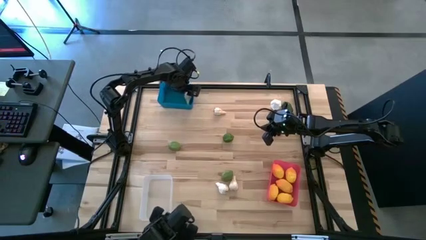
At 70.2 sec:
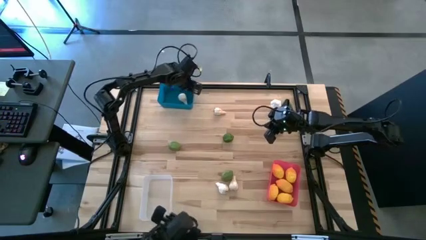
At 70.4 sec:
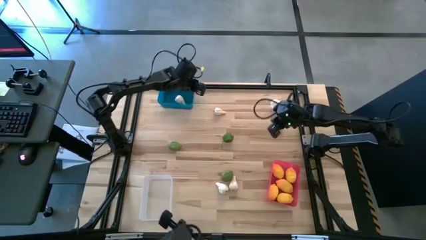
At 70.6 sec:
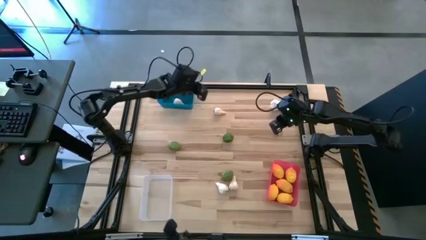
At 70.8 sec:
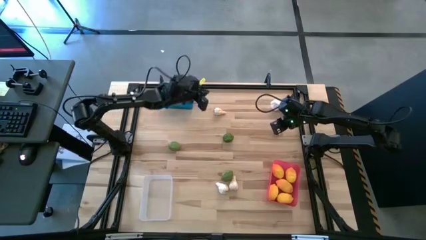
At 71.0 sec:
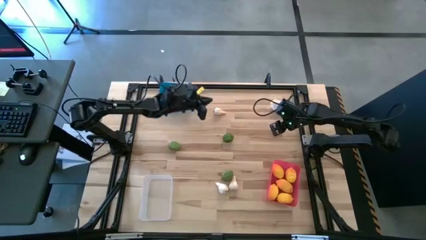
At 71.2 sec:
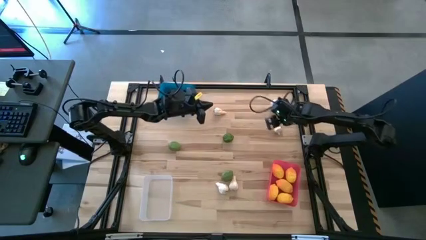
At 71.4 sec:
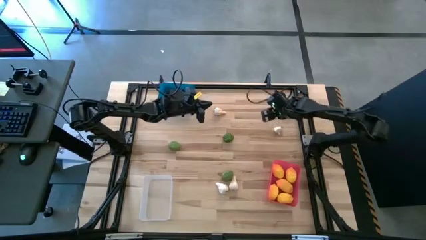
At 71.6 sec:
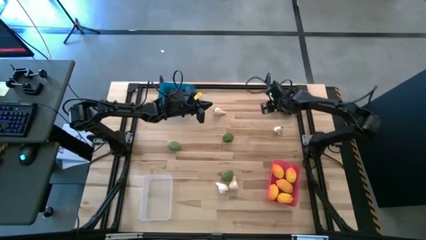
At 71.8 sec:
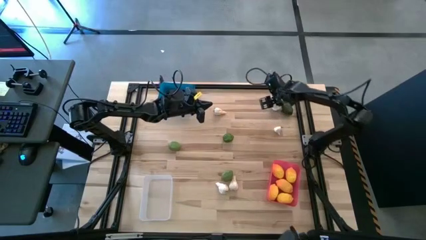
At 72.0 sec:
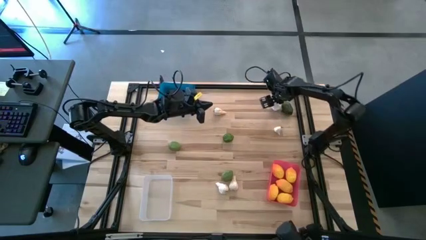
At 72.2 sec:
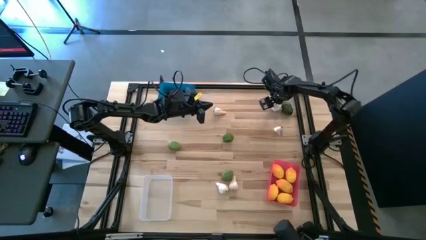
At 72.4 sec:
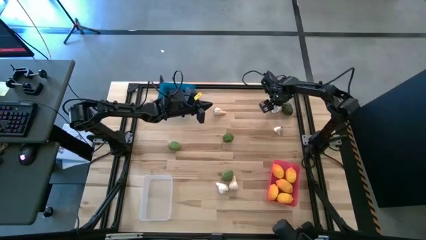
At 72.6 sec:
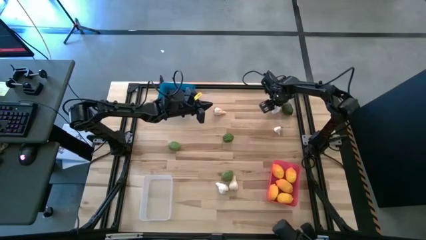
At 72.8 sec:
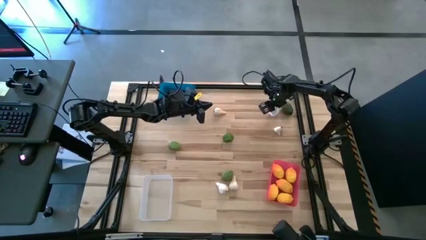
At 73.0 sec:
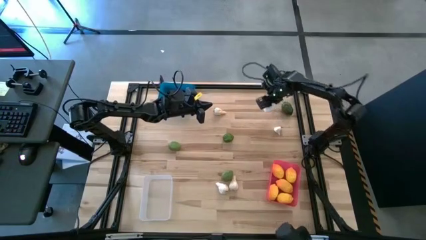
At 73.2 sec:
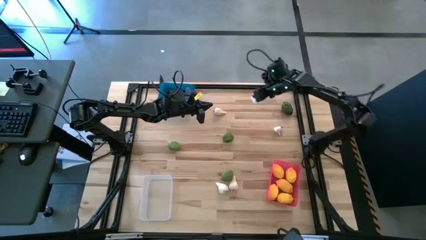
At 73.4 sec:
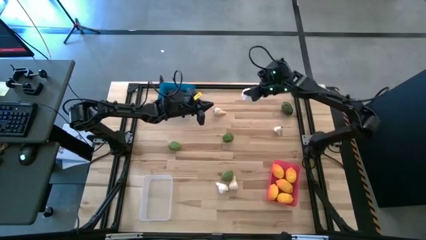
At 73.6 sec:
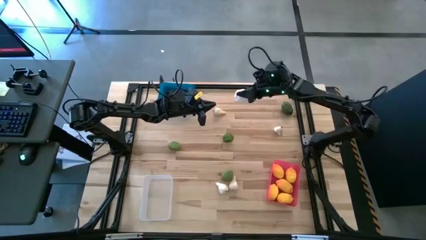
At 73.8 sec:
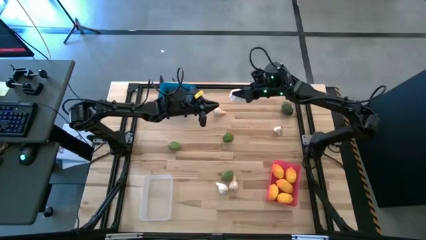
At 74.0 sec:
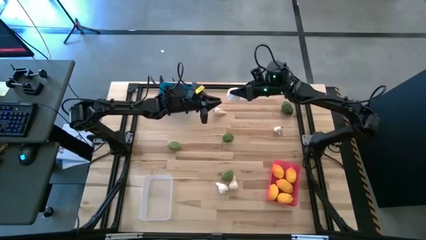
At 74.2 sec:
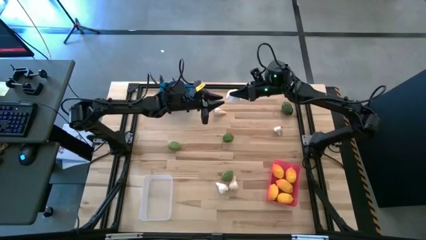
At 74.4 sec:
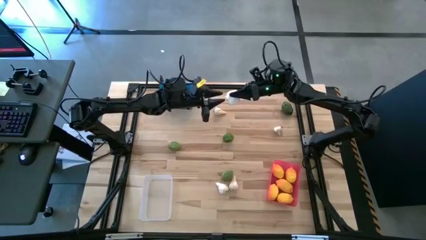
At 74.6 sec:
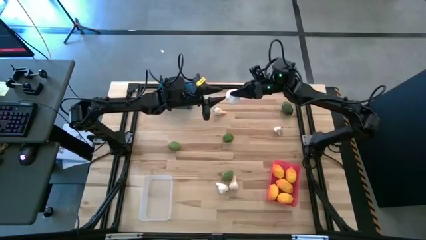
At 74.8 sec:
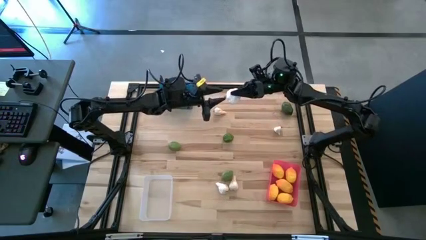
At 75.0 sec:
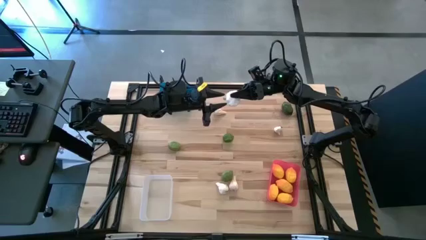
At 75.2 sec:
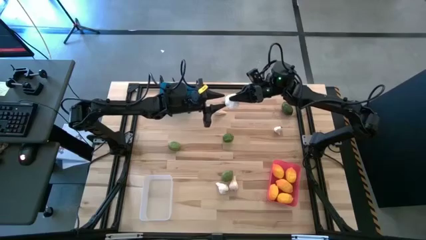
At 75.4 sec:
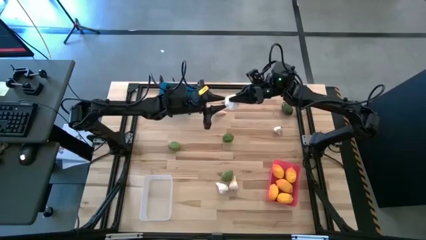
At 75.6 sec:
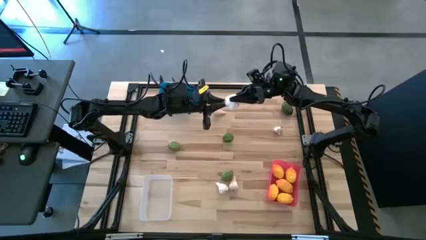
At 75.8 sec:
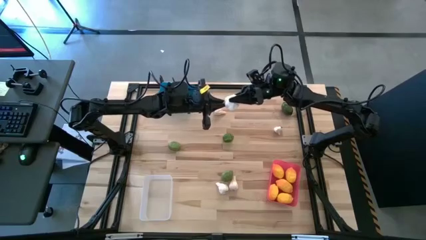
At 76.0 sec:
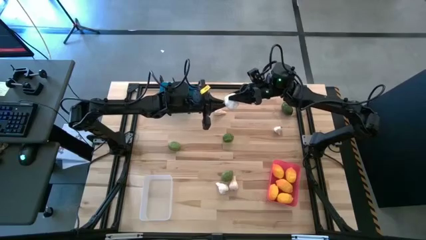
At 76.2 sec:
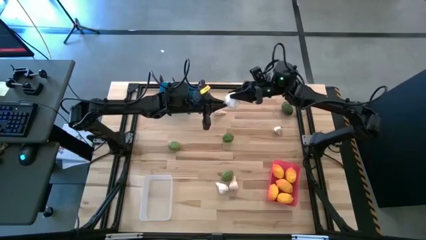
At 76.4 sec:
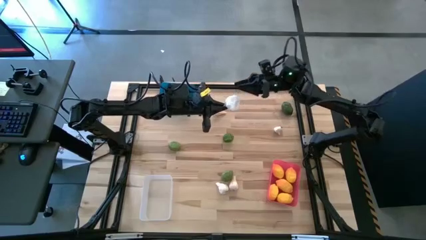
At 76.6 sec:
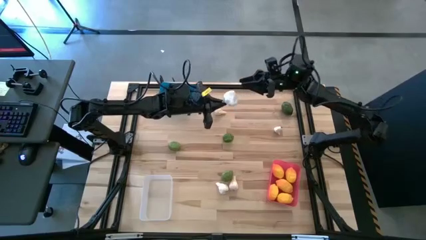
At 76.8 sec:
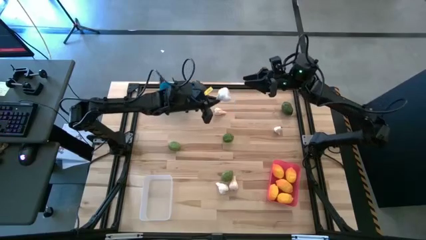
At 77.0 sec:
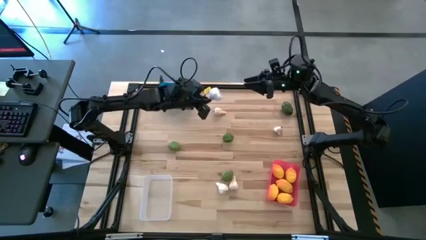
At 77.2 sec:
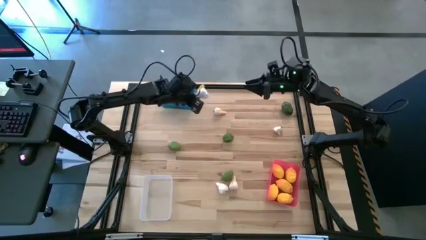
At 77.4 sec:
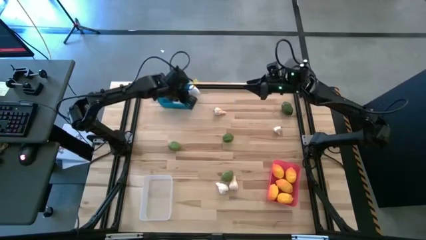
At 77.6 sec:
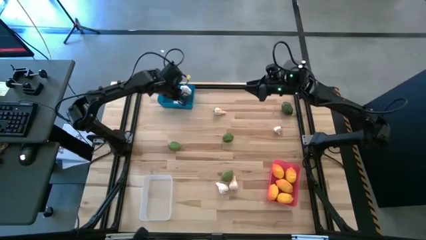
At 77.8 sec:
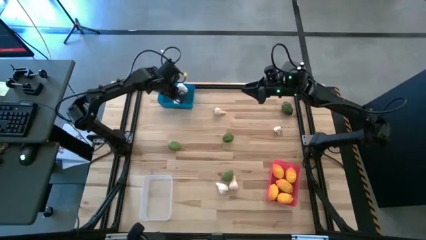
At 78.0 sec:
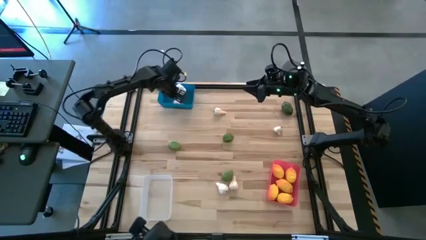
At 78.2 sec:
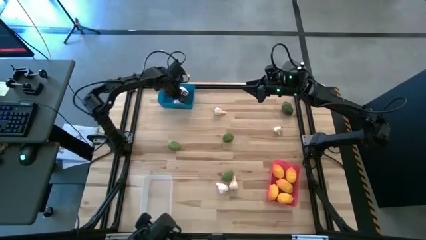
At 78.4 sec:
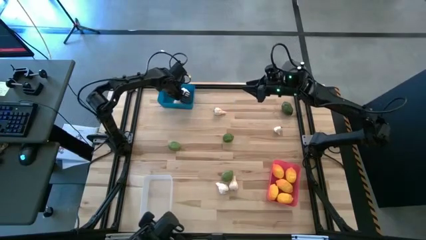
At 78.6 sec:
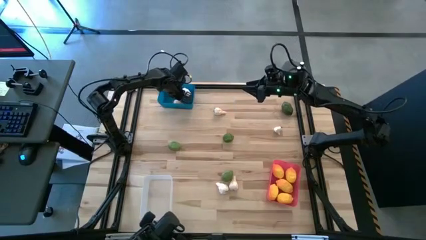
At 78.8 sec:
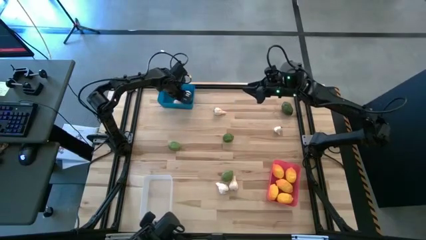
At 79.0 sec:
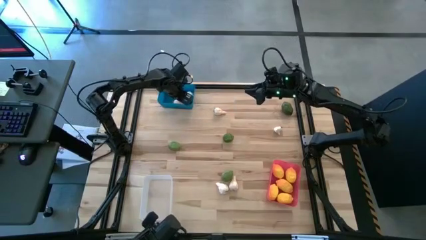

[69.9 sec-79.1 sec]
Task: Sort produce into baskets
Put the garlic into the blue bin

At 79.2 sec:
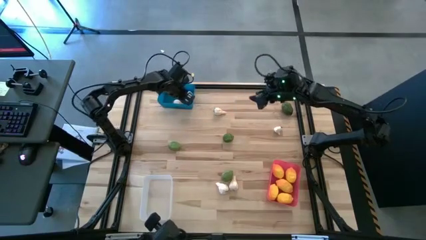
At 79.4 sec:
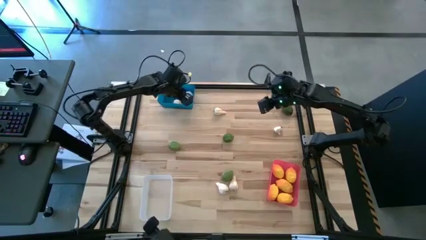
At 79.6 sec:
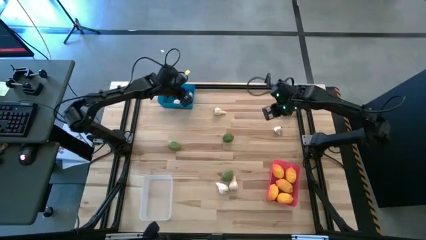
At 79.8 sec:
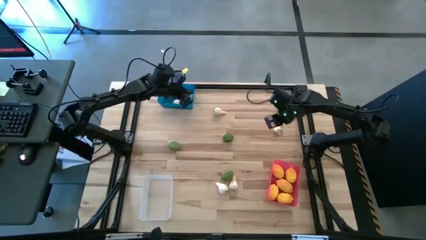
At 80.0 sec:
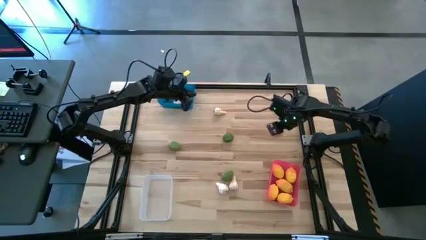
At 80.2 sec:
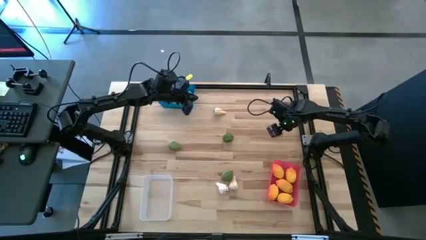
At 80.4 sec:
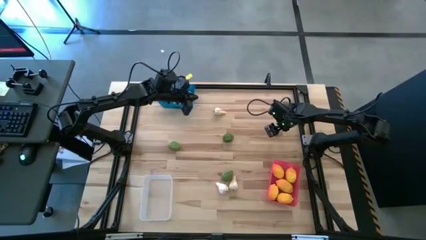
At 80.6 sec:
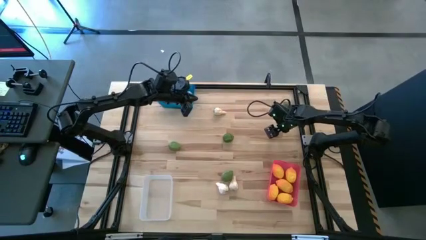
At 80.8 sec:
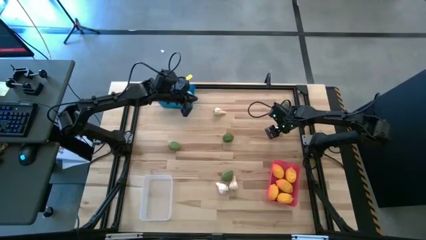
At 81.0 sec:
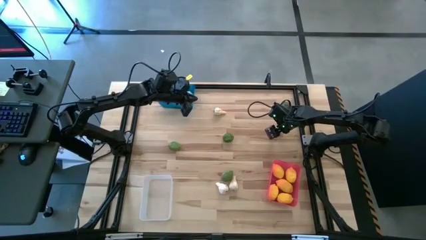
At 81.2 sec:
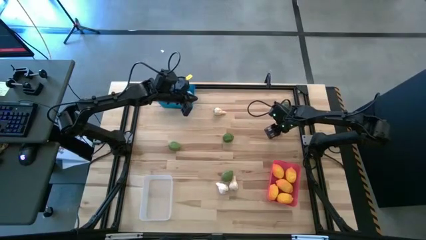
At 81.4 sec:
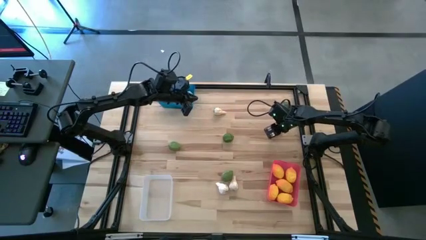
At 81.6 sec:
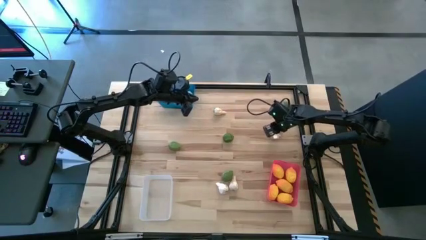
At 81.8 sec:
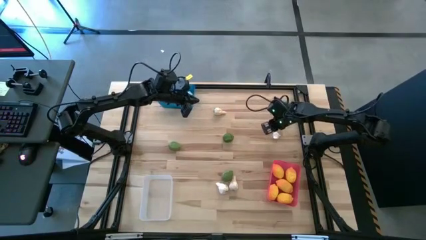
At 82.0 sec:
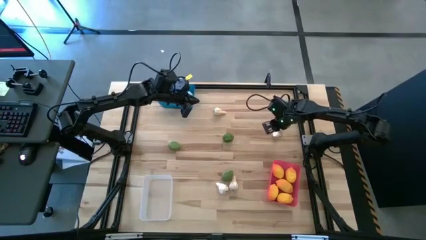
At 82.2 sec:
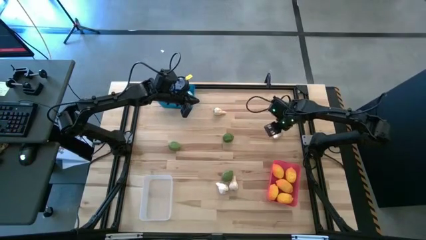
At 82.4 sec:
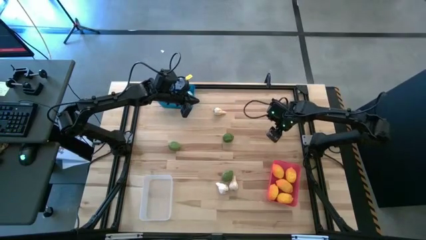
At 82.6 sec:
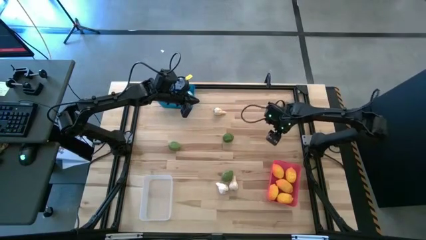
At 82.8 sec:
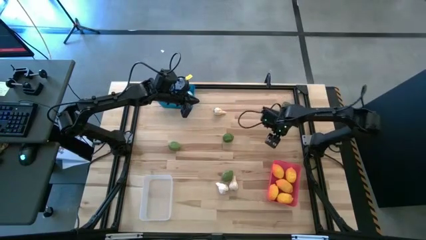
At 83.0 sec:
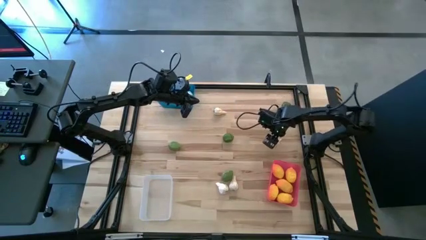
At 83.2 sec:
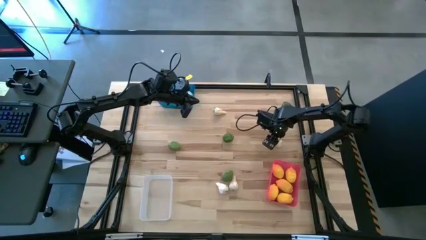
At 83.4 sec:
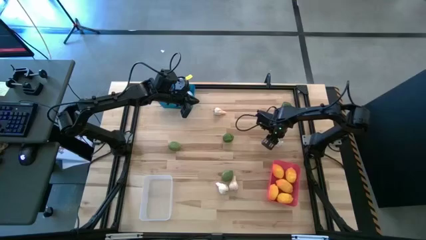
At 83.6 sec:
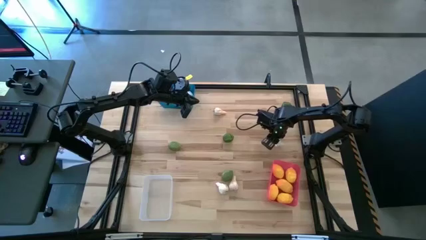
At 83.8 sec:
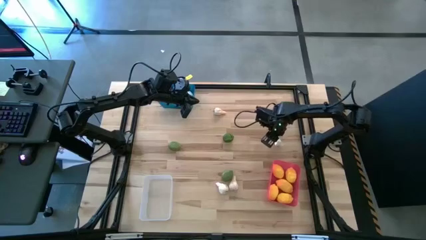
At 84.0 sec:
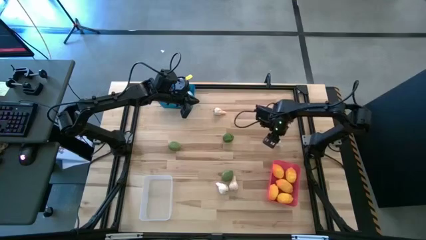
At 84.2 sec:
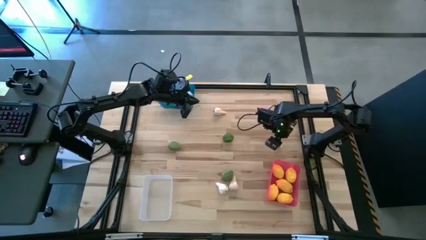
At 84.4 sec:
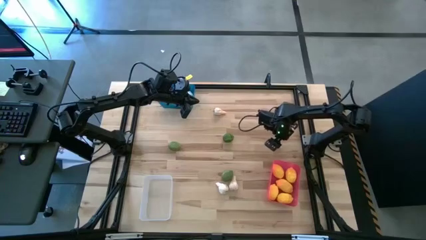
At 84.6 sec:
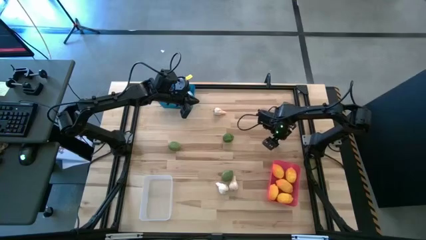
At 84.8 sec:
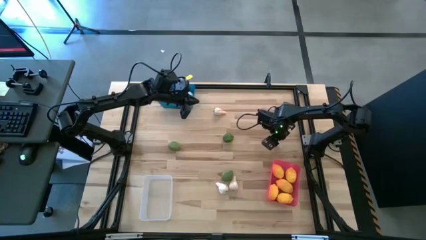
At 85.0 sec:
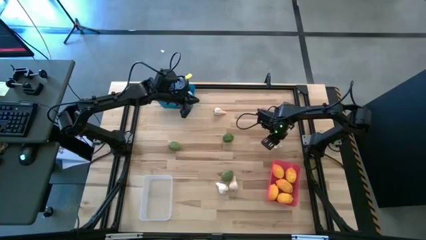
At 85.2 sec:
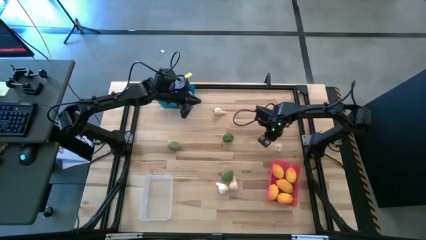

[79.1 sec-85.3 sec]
Put the garlic into the blue bin

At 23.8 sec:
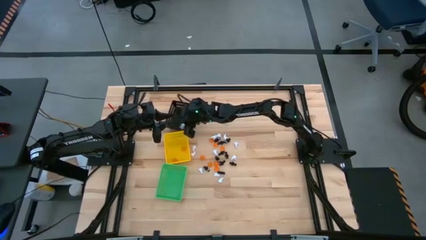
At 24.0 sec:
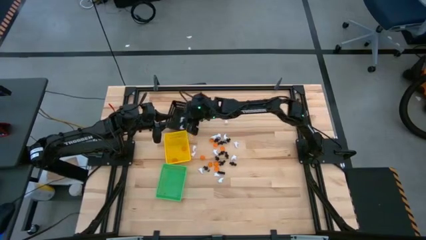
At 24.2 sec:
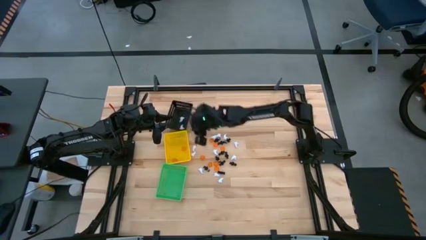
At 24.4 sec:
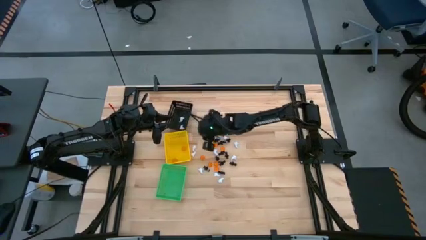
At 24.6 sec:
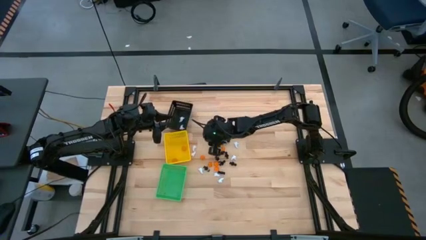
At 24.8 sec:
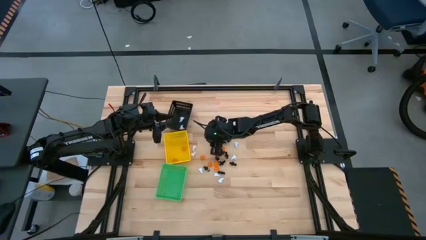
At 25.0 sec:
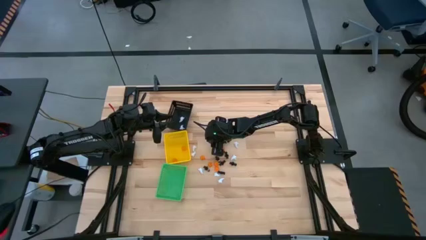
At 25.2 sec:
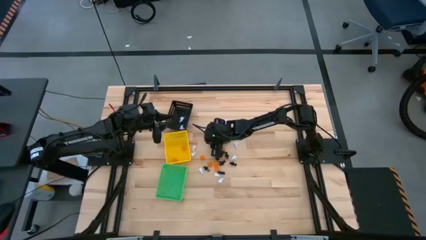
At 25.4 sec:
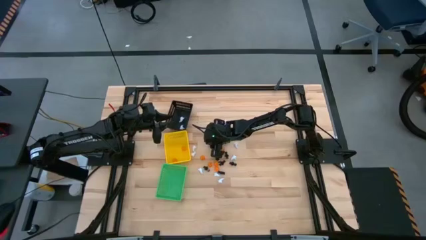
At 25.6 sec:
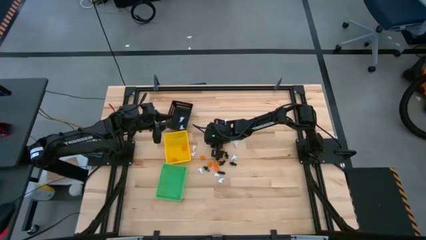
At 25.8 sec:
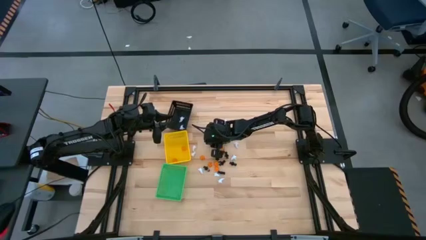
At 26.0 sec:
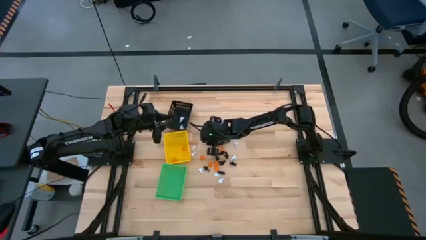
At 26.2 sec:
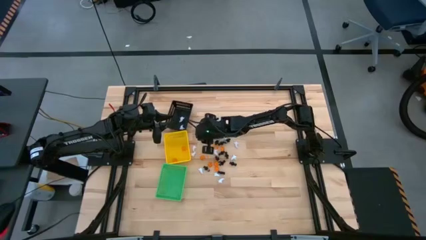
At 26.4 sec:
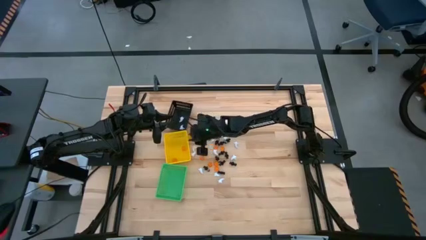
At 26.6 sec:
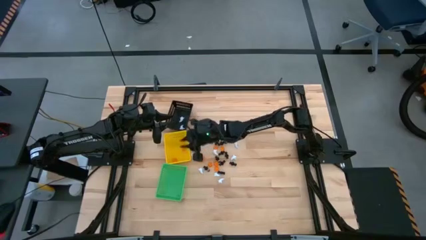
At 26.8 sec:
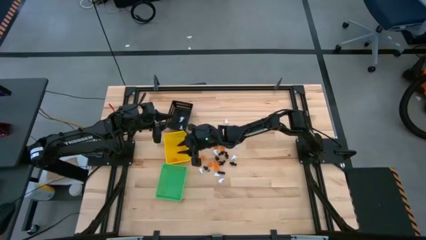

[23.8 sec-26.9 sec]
Task: Sort Halloween decoration
Put the orange pumpkin toy into the yellow basket
